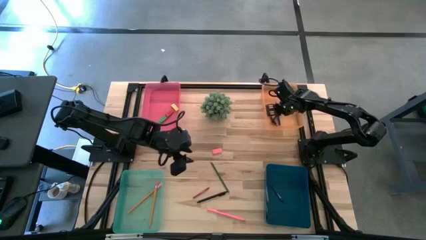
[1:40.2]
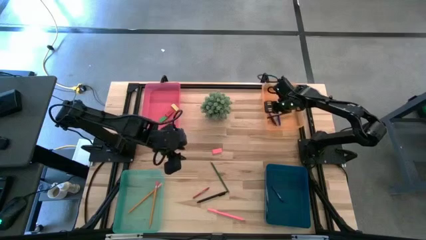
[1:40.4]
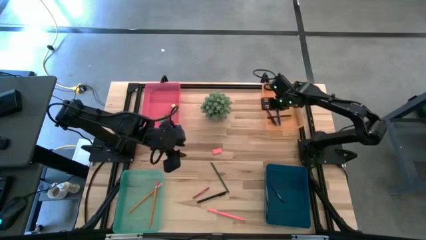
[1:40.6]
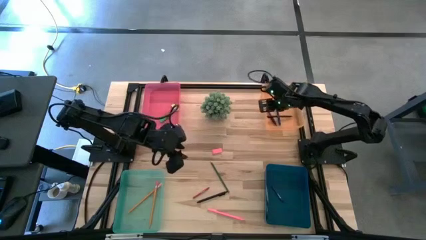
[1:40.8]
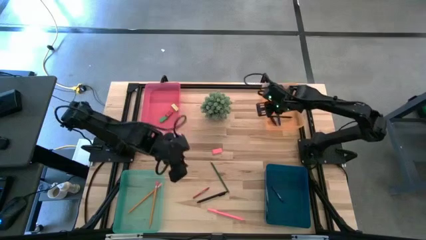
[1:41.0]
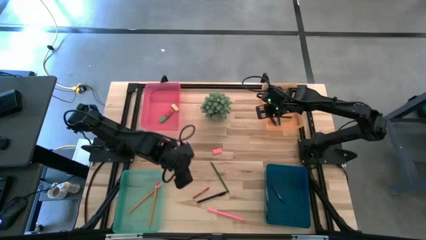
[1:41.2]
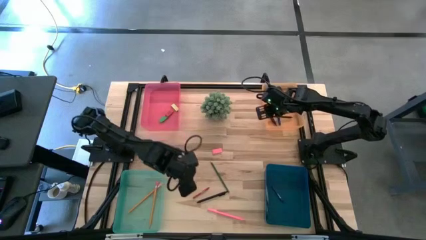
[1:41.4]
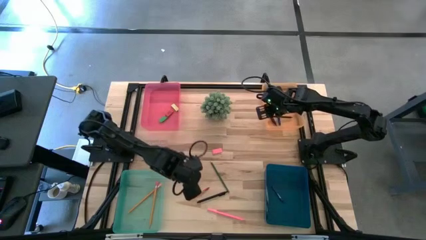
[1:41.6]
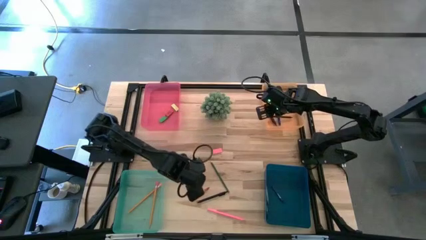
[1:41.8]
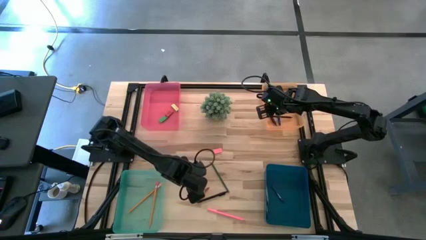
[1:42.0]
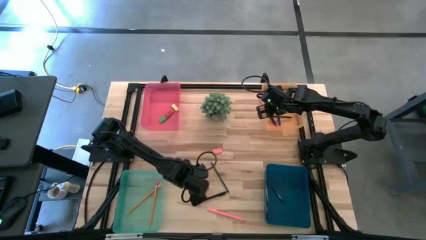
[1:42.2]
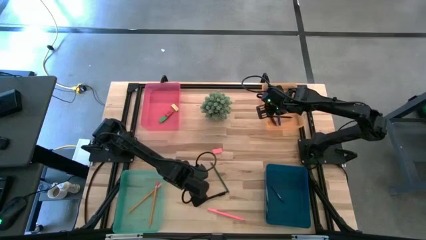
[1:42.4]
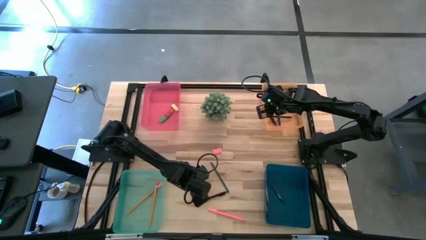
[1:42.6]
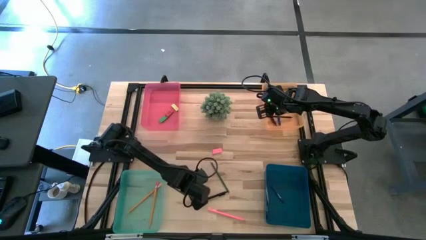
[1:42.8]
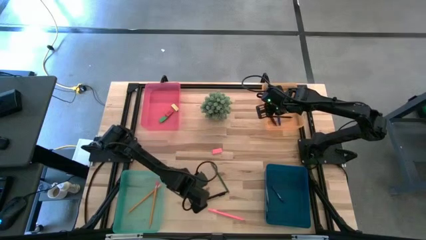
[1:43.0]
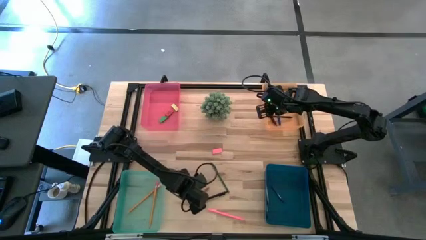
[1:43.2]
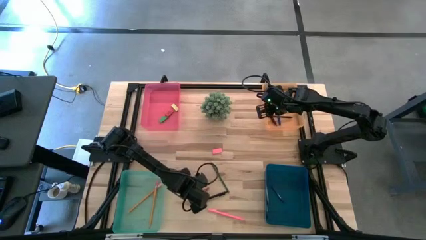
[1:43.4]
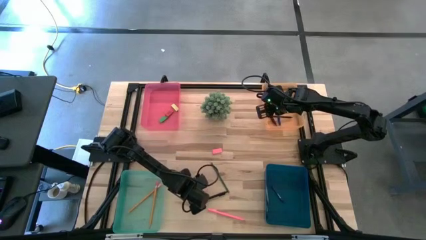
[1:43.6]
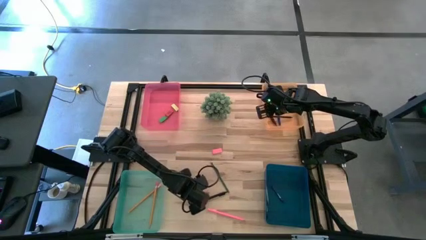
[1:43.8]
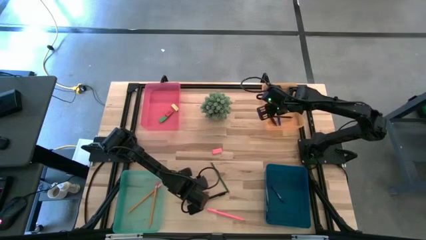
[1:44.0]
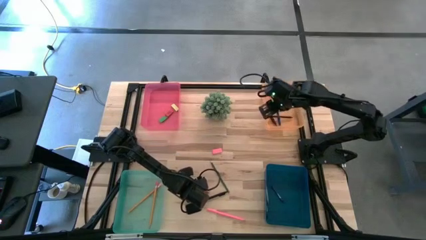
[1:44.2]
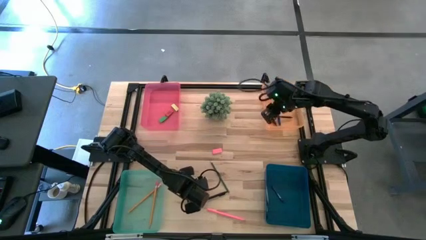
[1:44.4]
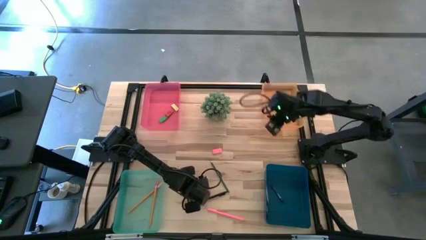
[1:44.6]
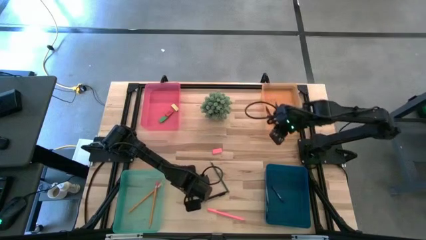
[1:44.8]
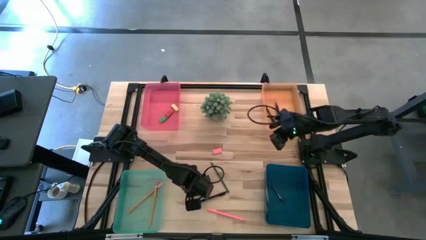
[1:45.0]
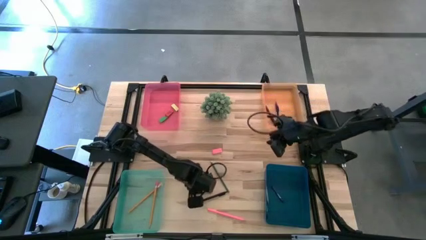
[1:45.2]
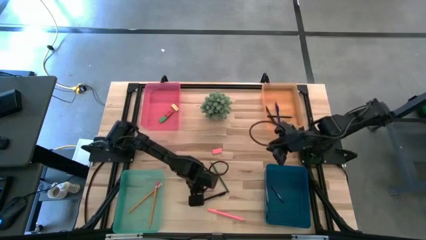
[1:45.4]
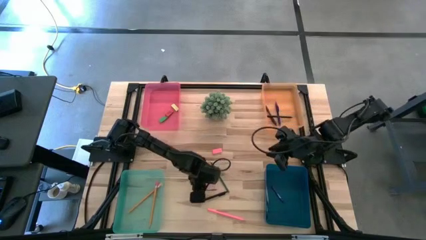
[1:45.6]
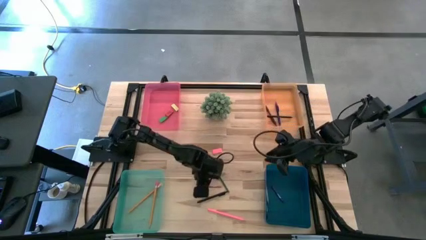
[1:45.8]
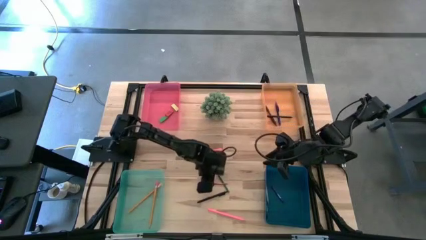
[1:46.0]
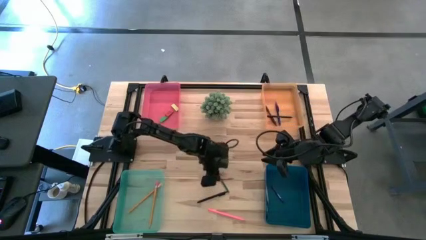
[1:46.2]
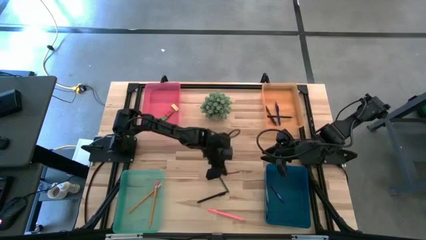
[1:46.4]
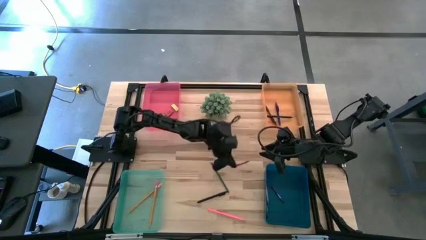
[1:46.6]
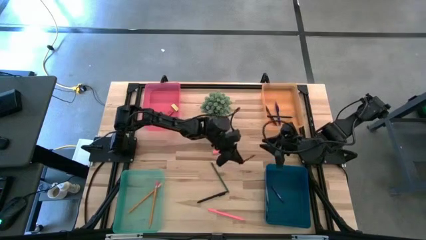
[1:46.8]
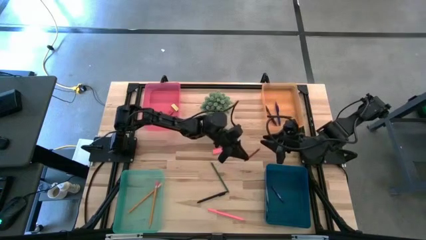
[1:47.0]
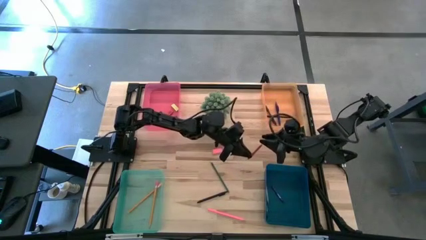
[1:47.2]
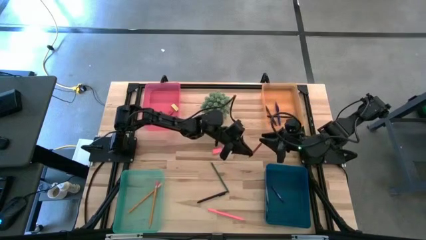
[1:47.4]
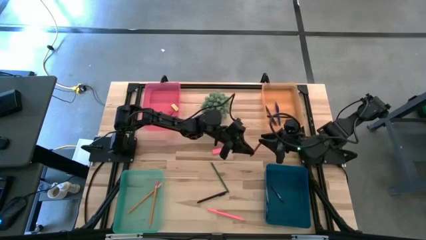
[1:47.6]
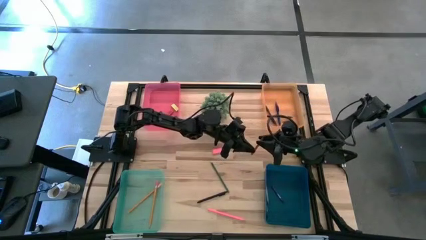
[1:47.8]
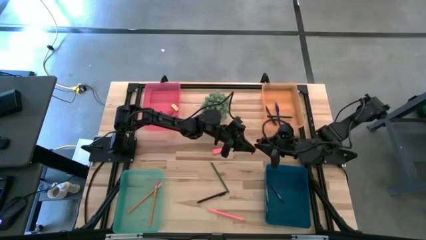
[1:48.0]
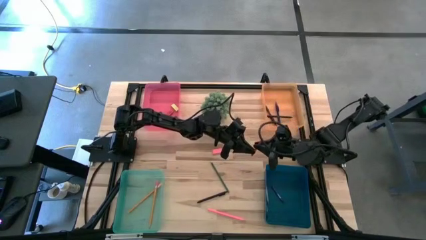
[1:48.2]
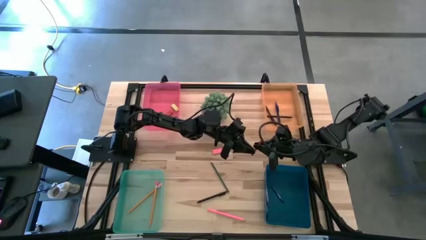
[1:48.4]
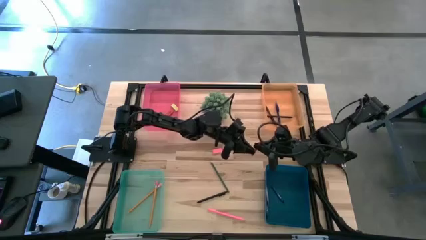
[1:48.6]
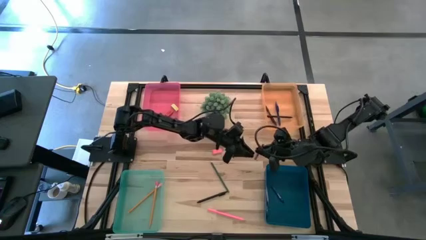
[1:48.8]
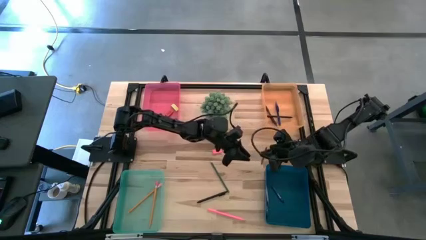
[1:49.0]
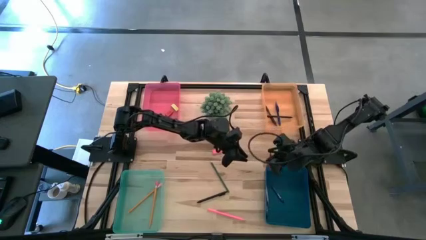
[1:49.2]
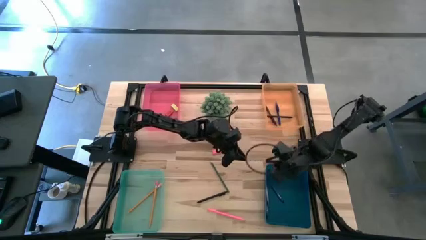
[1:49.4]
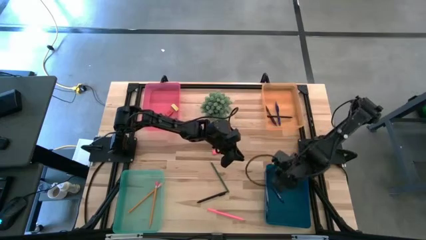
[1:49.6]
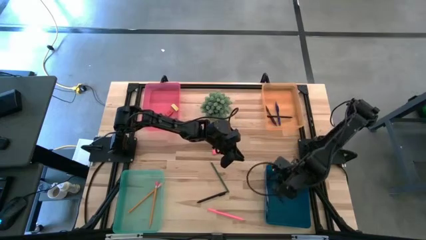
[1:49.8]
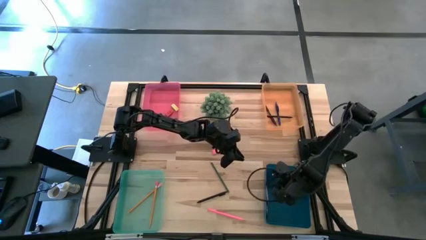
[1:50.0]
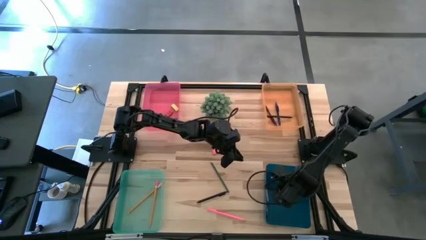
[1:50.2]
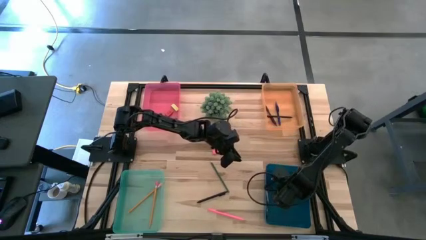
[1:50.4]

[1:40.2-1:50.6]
Task: Sort crayons/erasers/pens/pencils in bins
Put the red crayon into the blue bin

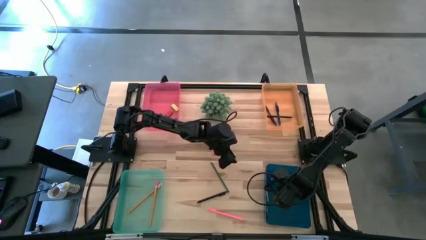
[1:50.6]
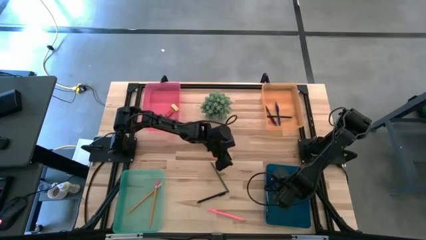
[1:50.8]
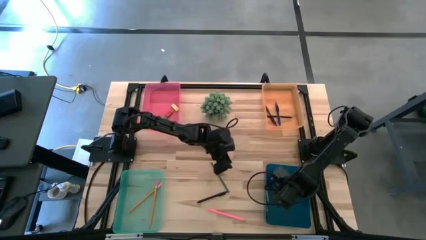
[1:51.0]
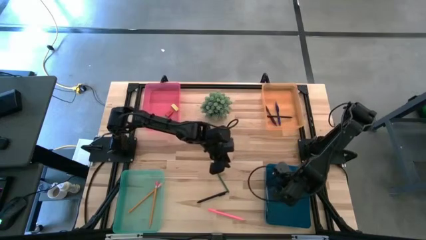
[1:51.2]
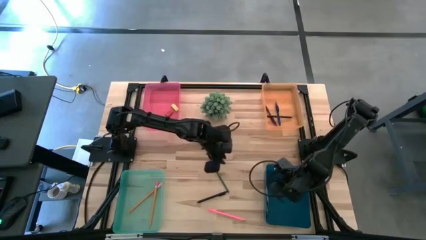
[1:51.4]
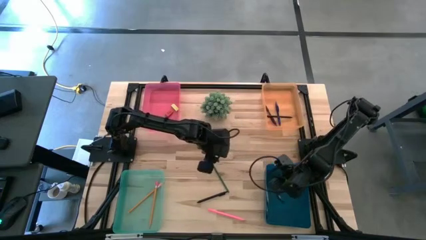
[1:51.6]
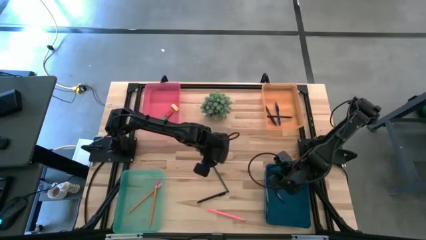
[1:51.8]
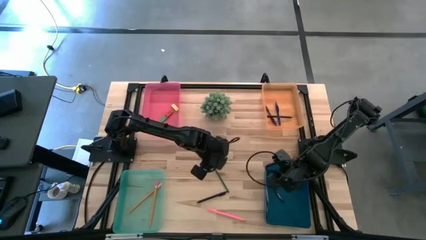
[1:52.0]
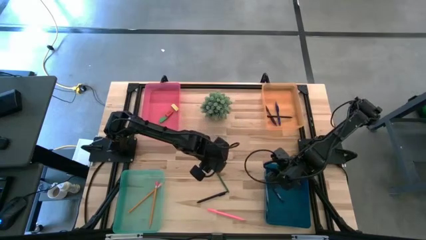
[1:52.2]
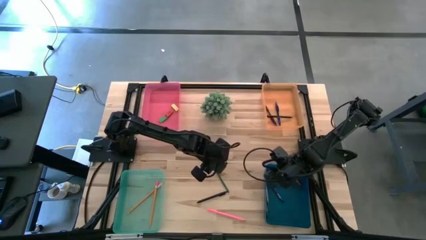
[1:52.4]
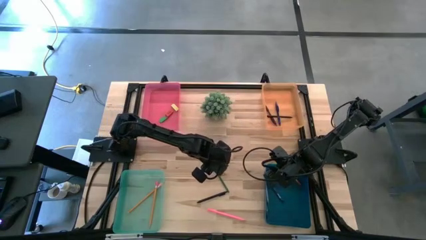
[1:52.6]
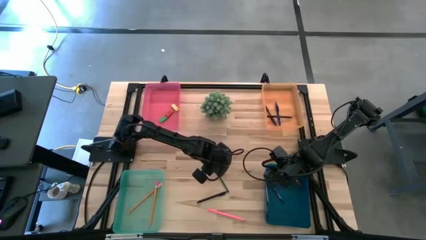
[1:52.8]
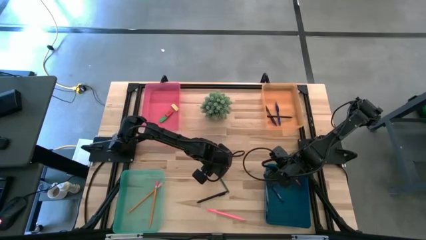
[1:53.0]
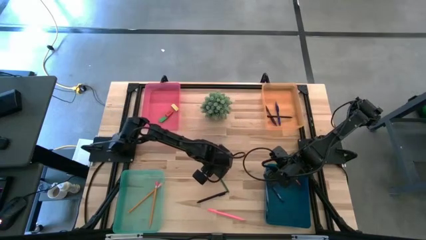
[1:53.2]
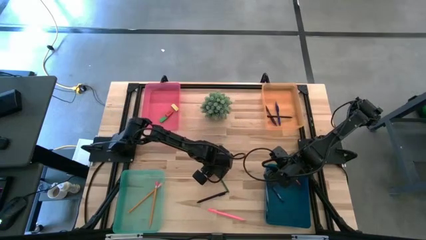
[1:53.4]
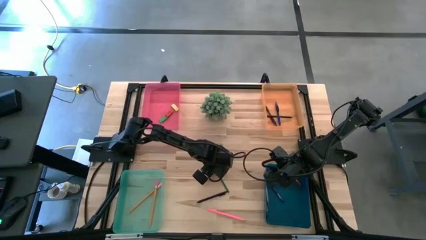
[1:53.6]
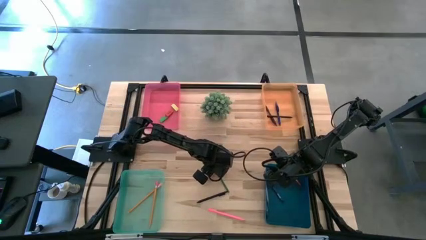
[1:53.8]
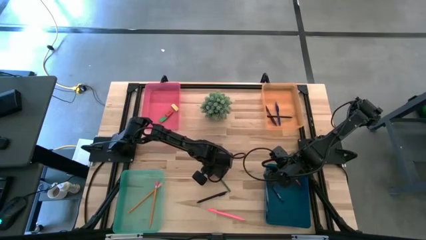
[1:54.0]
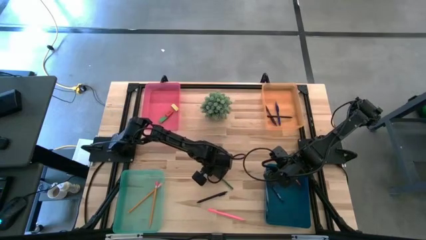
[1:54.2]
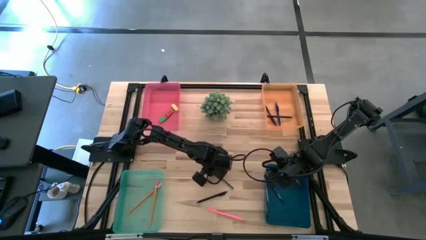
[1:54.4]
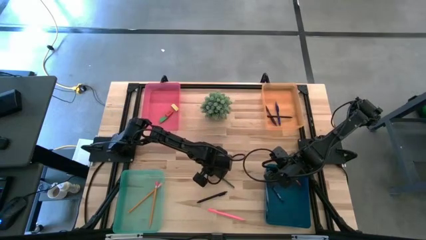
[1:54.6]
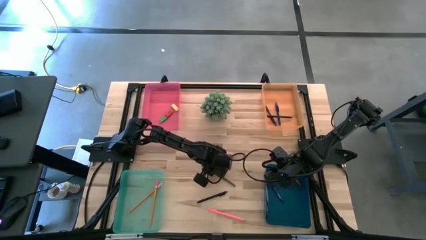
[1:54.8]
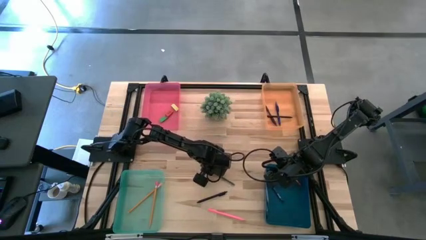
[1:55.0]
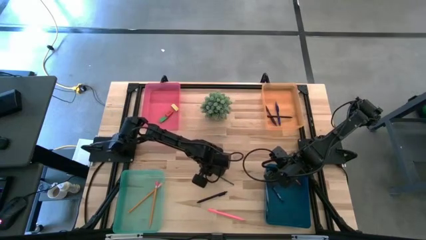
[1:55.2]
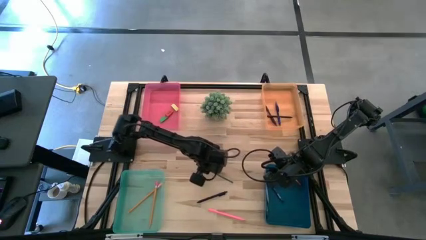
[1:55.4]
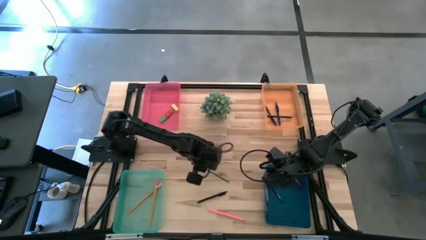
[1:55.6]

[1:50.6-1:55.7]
Put the green pencil into the green bin
